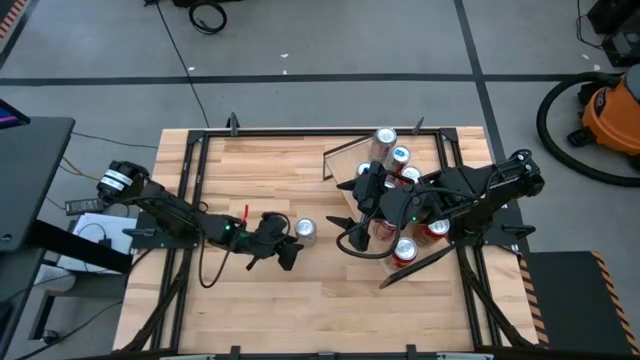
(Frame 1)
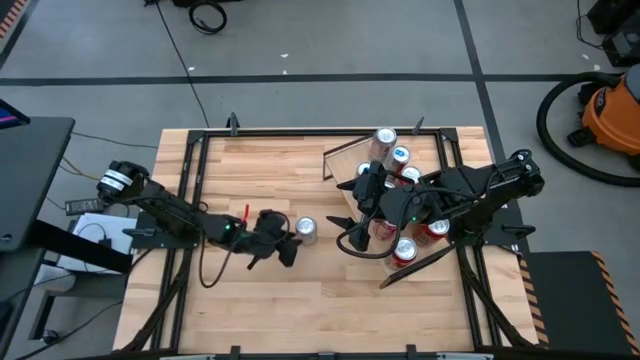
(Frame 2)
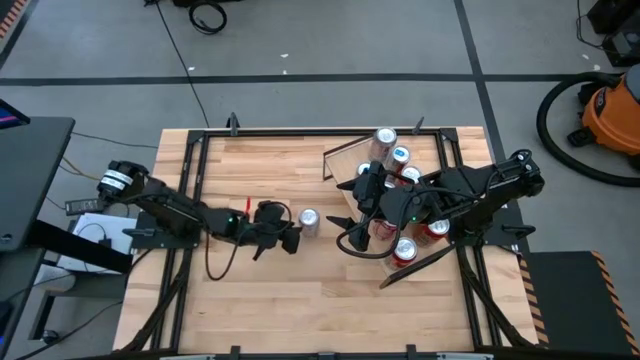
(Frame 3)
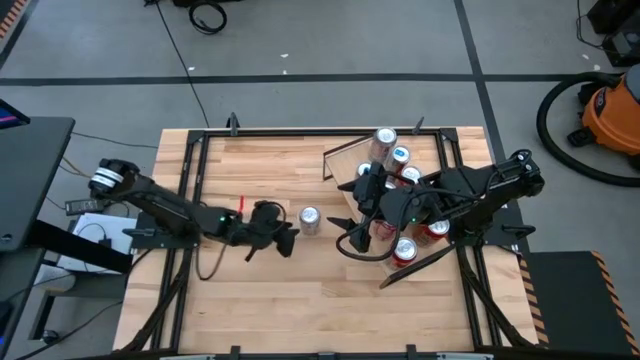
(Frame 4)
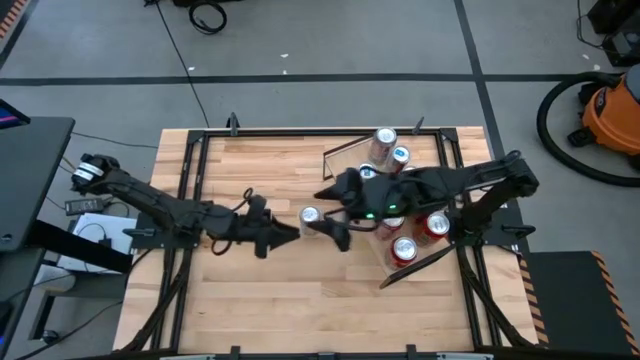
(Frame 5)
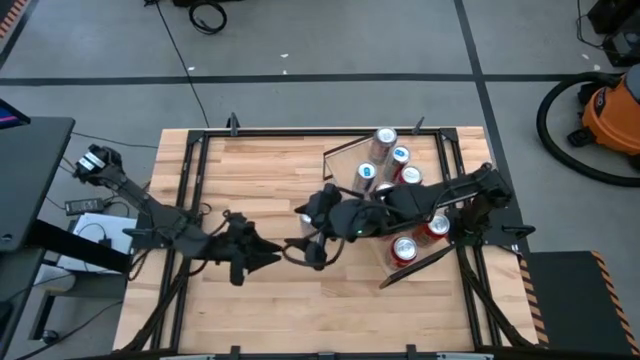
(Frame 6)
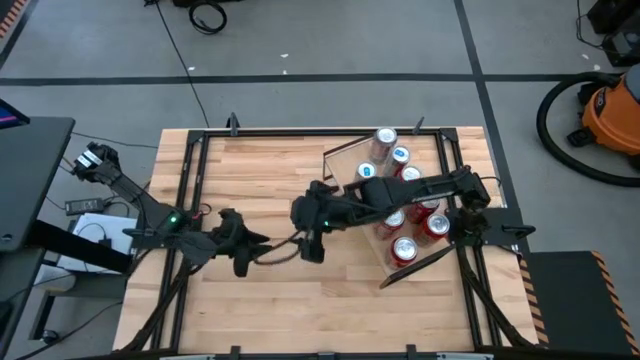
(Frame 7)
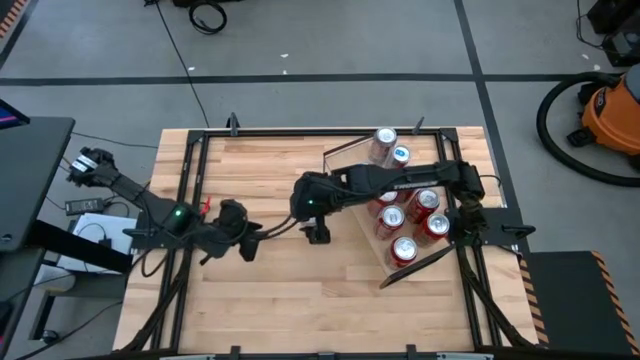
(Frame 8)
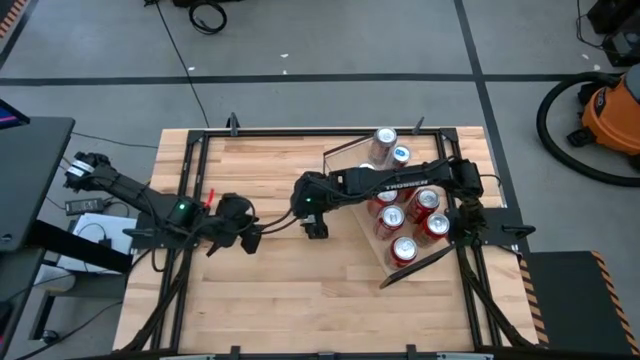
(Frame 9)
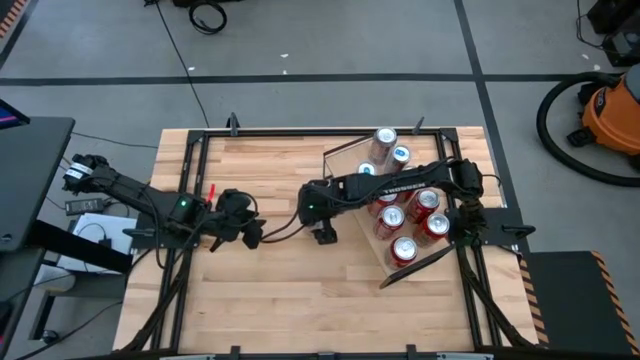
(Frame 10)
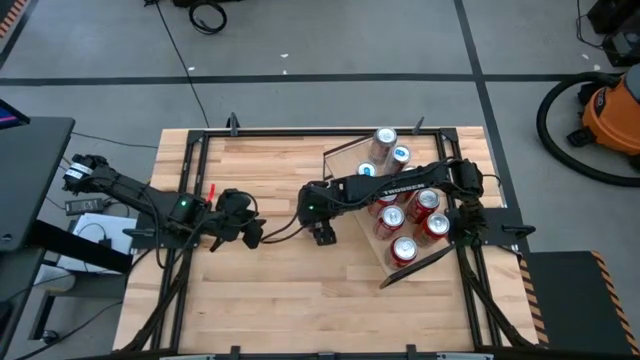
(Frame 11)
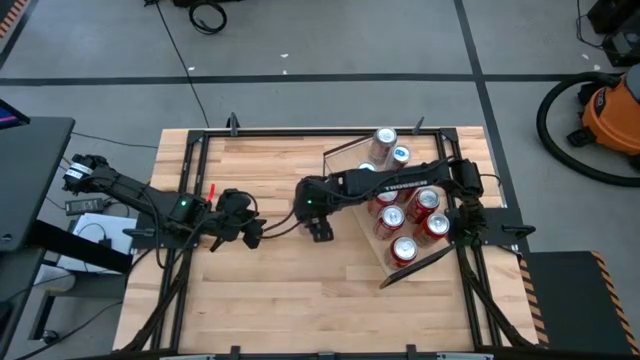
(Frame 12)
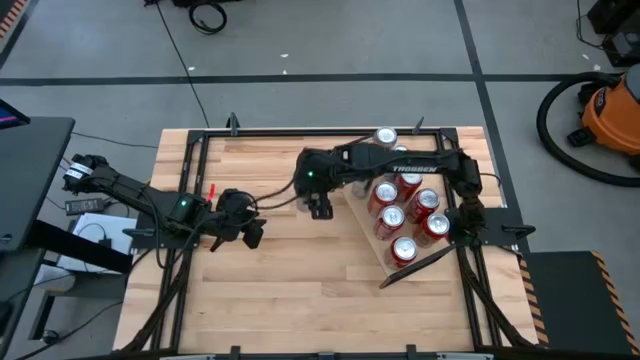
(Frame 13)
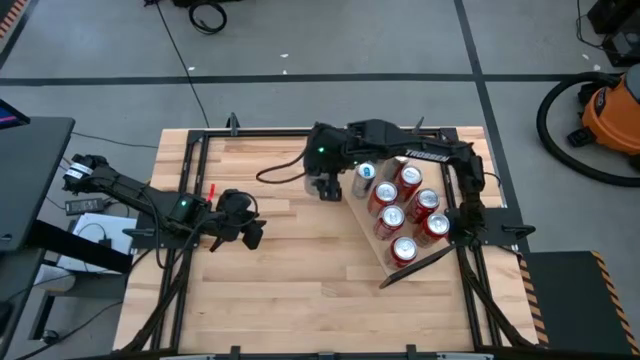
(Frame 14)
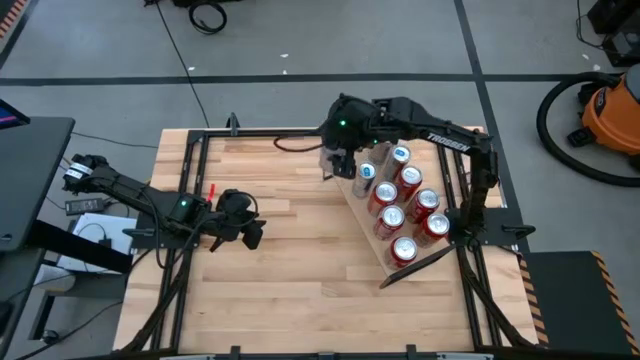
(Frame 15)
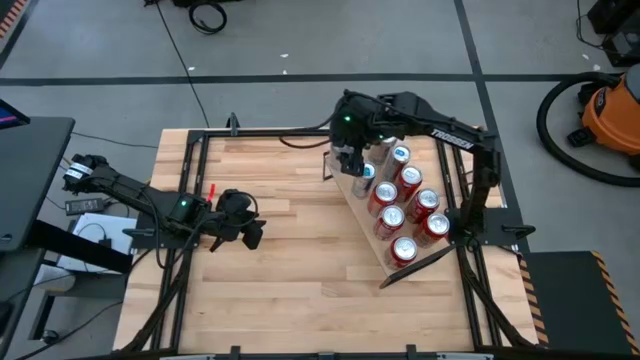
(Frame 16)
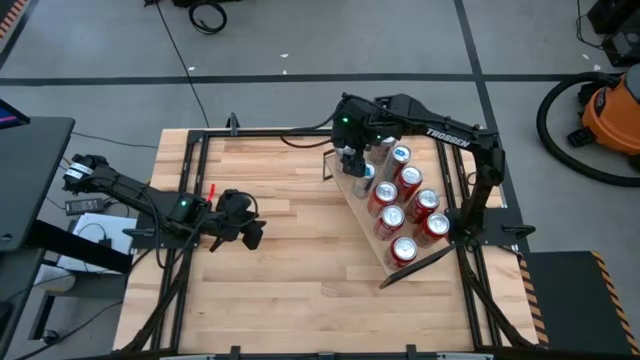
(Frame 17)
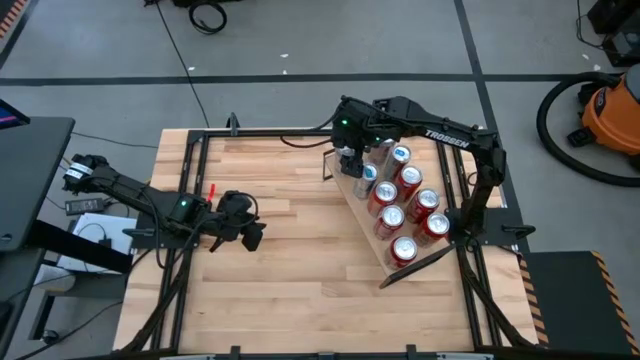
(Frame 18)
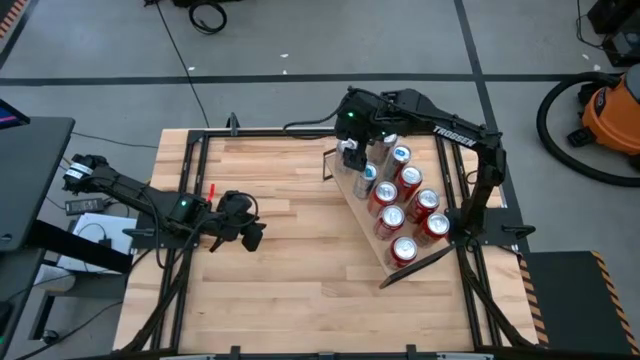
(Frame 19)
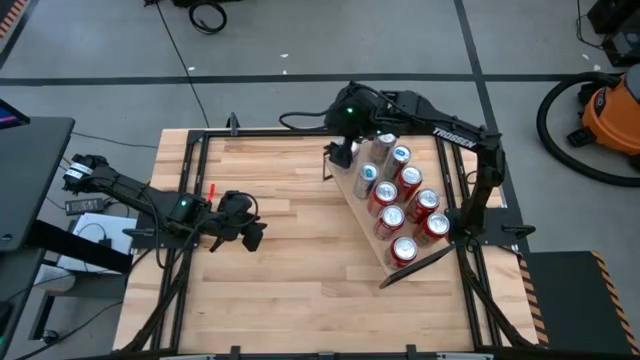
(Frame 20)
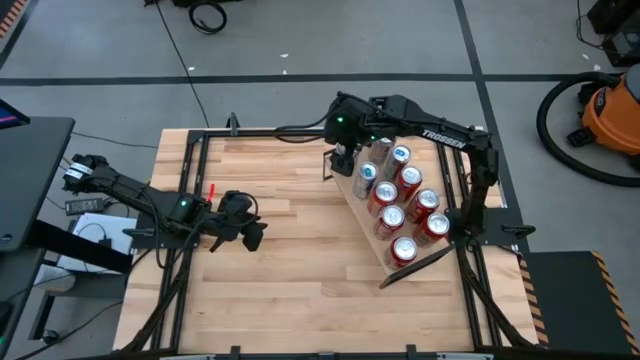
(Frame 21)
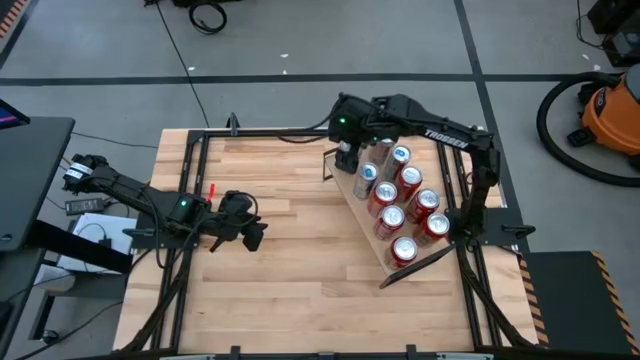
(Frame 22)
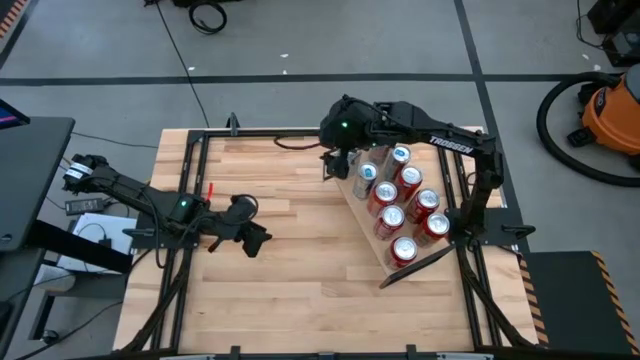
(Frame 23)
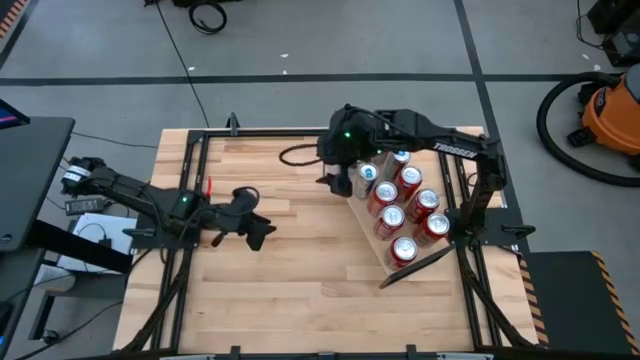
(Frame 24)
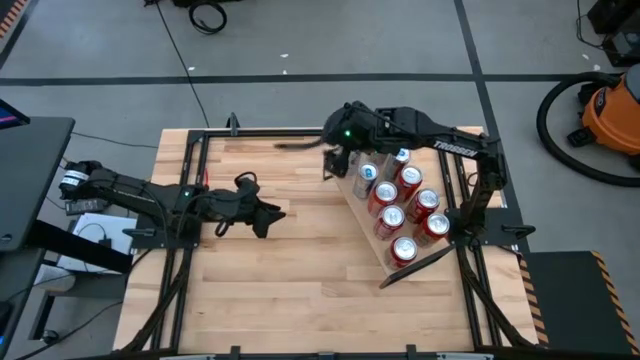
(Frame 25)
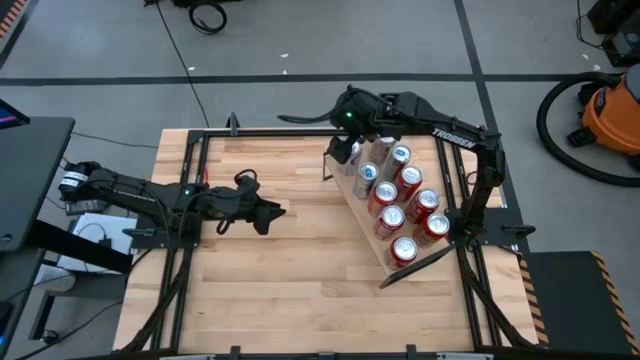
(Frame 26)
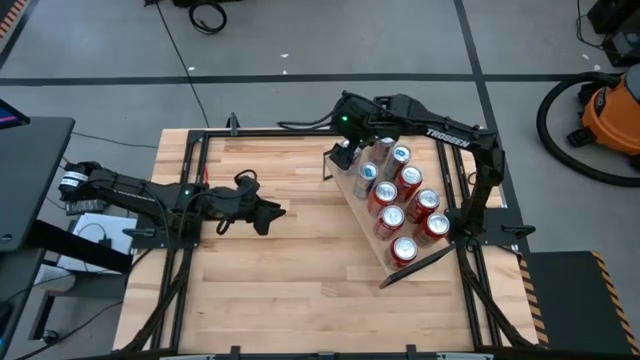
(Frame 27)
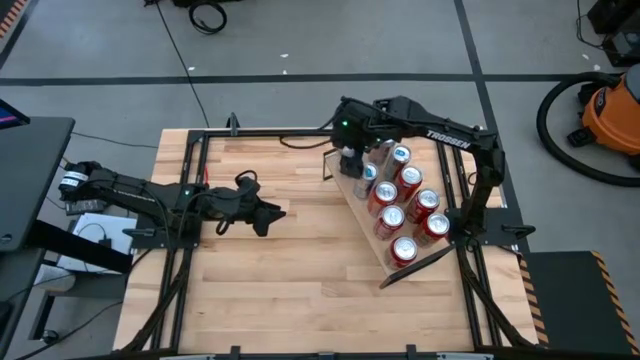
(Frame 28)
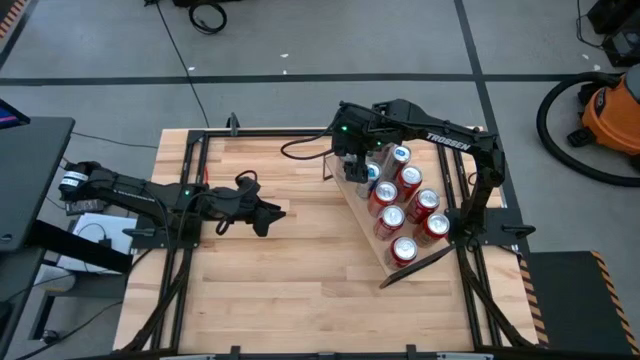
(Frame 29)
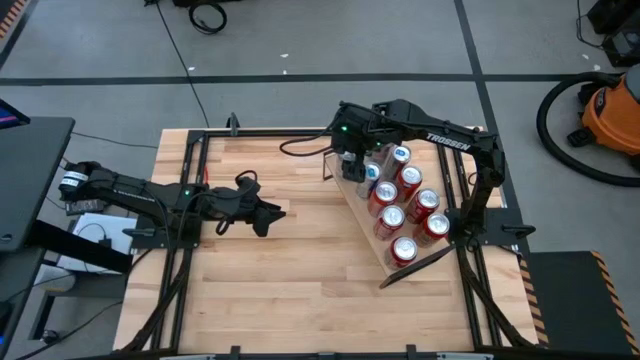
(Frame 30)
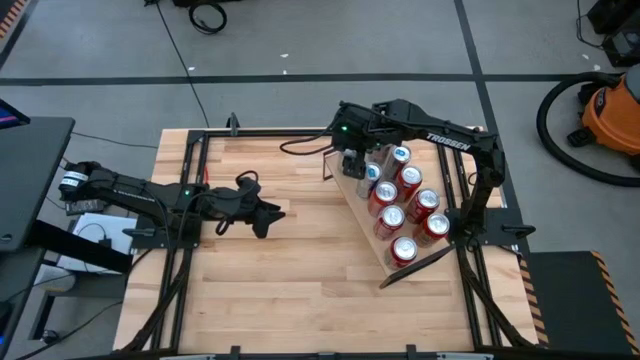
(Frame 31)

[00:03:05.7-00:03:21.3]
Task: Place canned beverage on shelf
Put the silver soda can on the shelf aligned with the other silver can

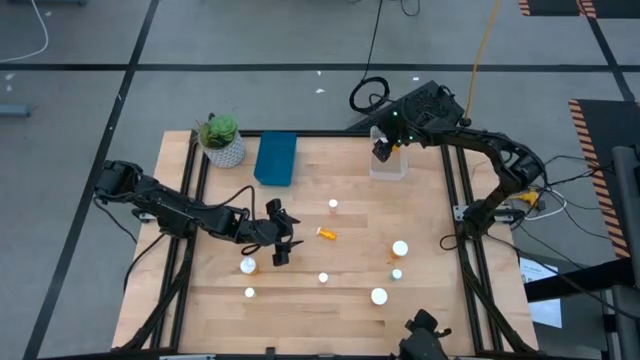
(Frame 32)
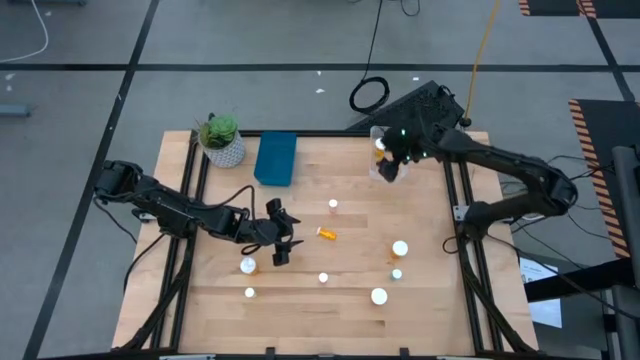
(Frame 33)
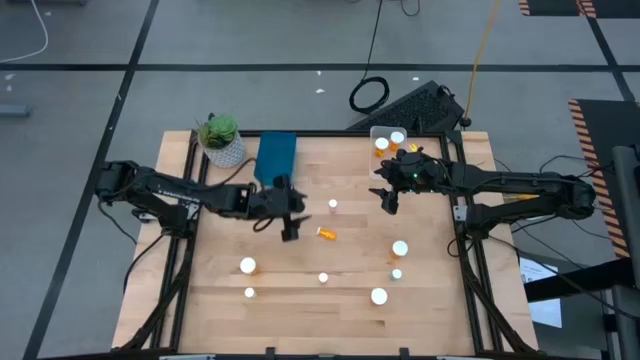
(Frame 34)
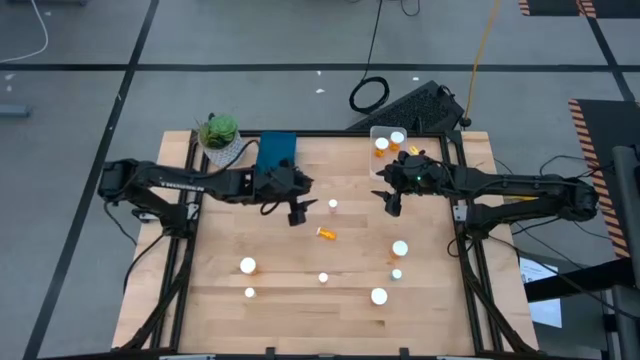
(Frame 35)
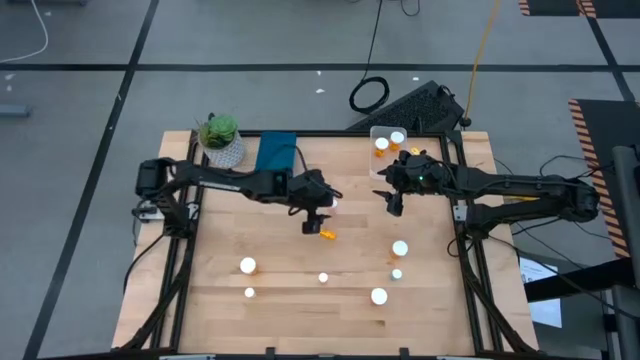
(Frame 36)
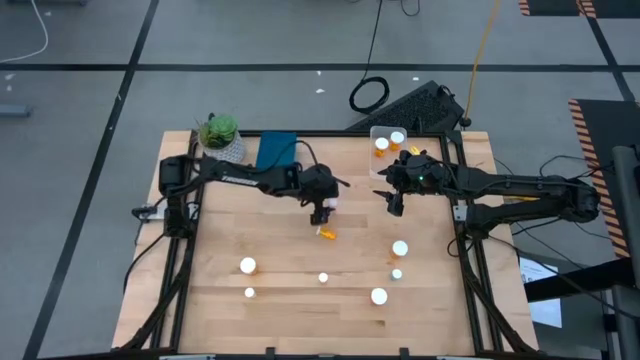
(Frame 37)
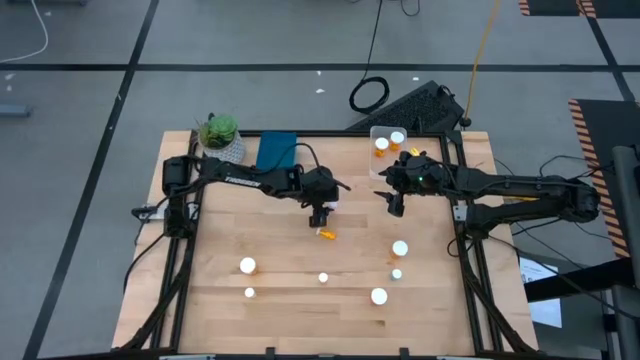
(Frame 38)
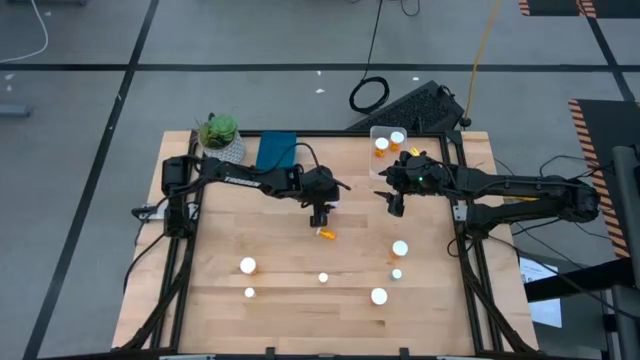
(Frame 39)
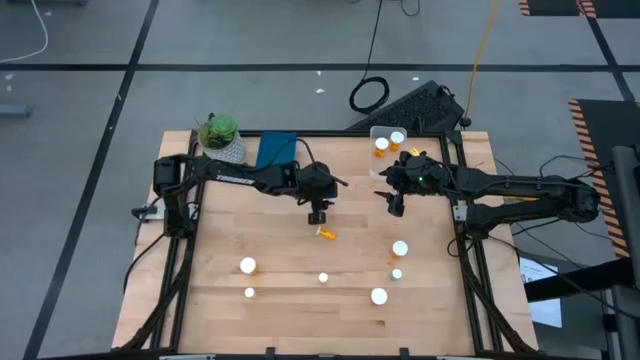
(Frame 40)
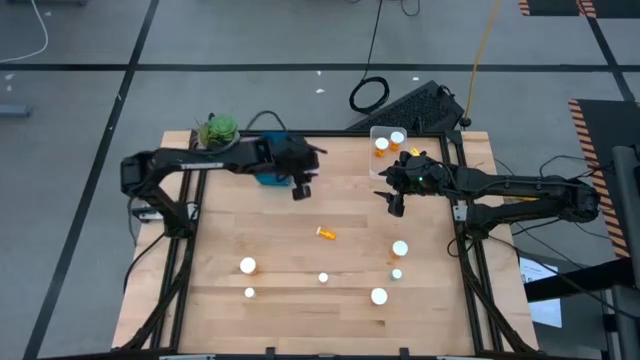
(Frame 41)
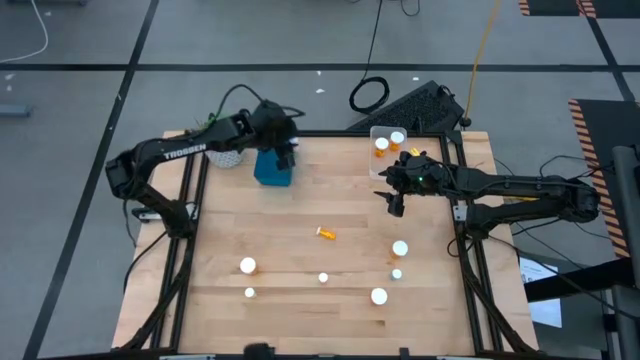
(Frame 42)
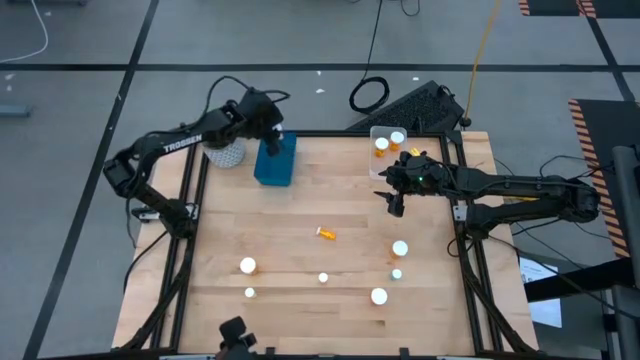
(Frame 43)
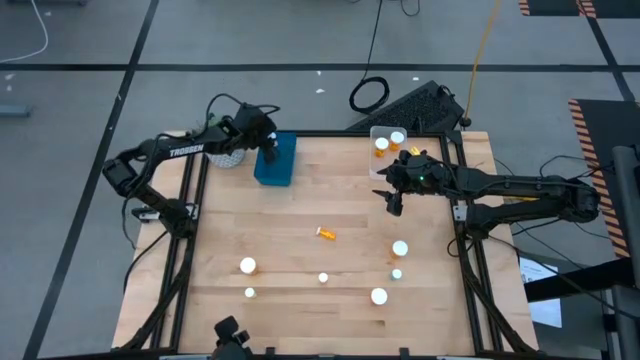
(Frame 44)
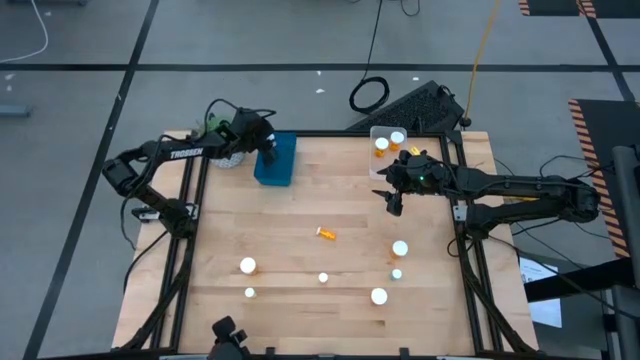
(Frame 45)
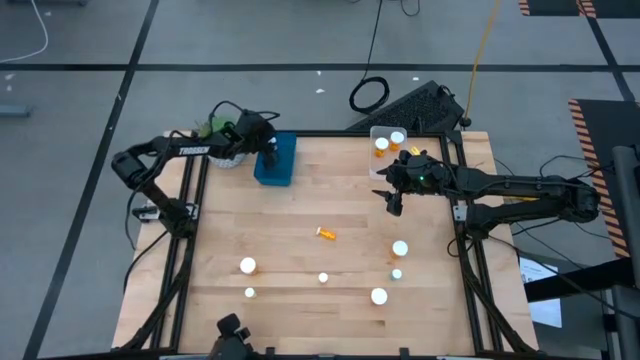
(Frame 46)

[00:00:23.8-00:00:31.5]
Task: Pick and place medicine bottles into bin by pill shape (circle, oval)
Put the pink bottled tablets into the blue bin
